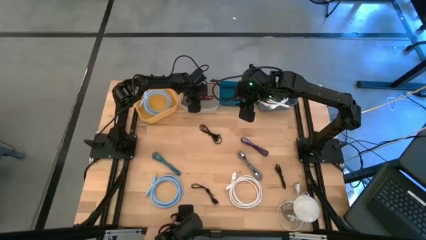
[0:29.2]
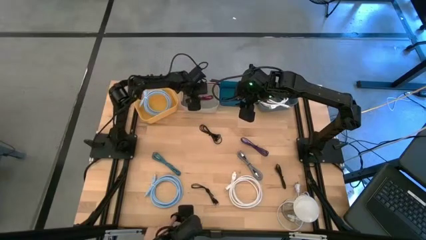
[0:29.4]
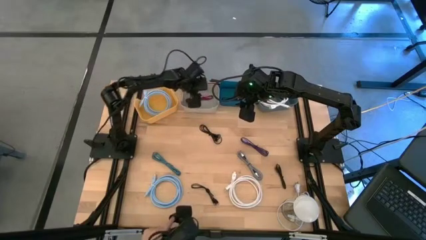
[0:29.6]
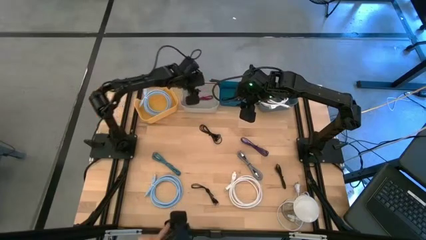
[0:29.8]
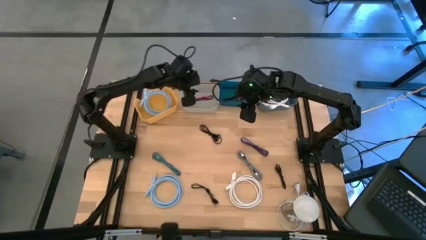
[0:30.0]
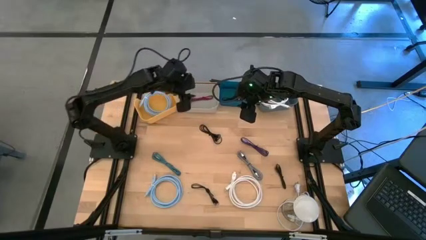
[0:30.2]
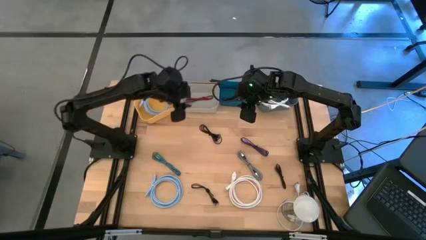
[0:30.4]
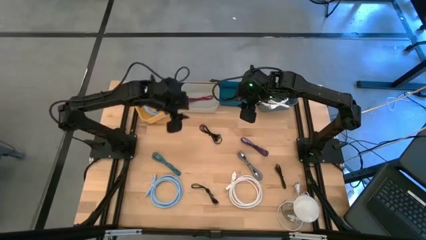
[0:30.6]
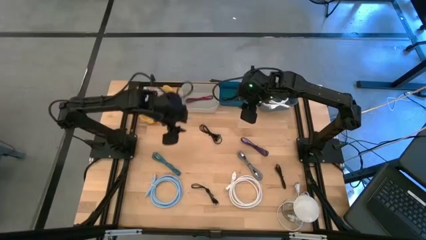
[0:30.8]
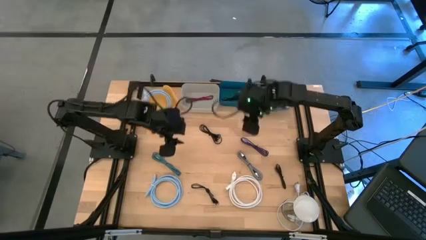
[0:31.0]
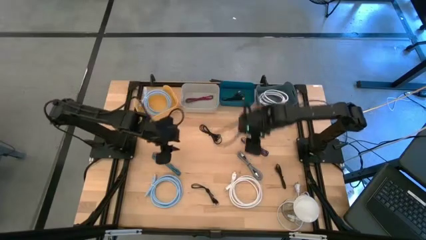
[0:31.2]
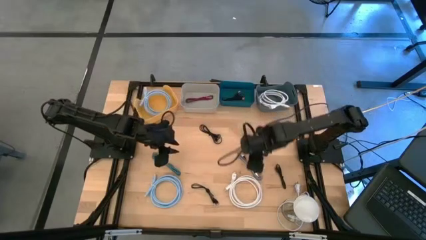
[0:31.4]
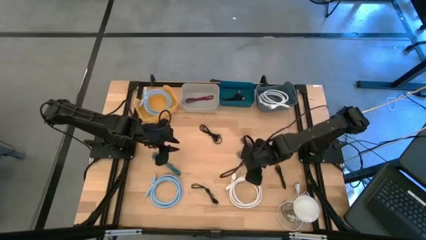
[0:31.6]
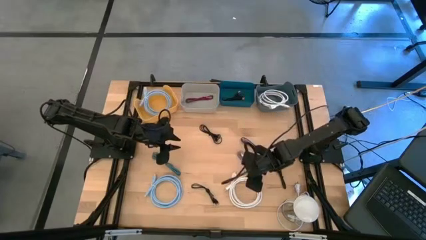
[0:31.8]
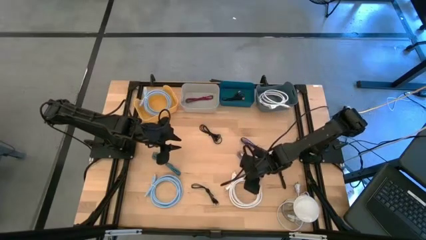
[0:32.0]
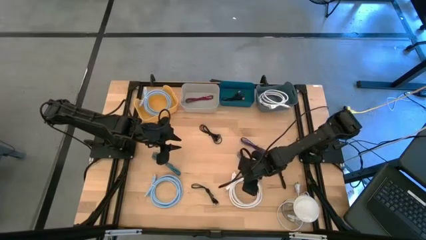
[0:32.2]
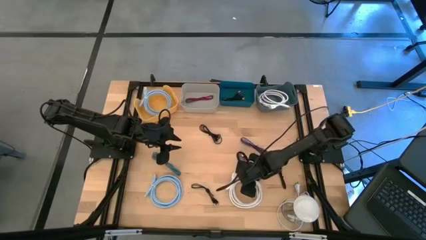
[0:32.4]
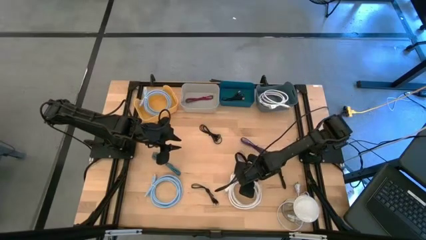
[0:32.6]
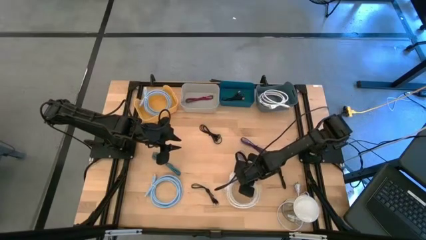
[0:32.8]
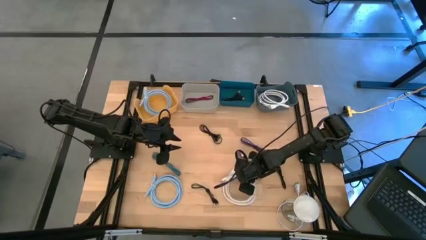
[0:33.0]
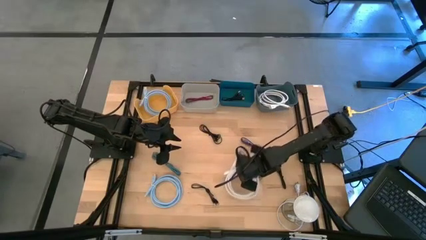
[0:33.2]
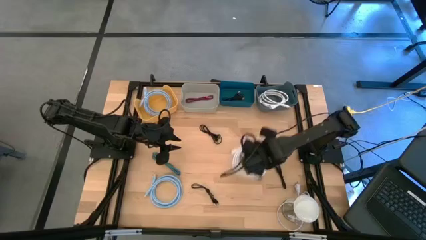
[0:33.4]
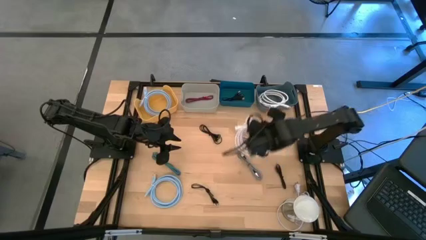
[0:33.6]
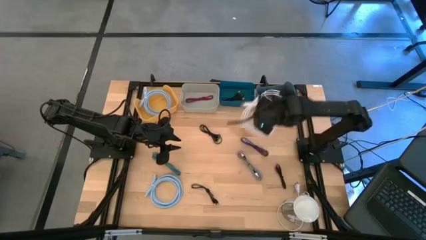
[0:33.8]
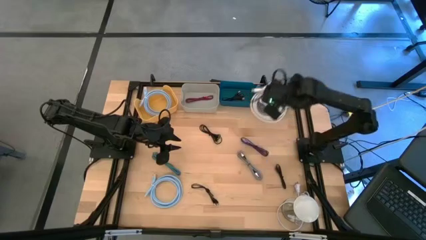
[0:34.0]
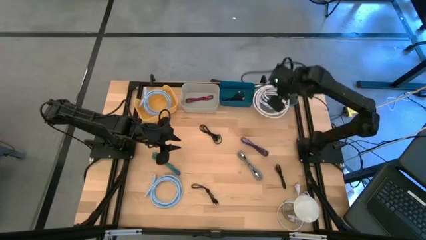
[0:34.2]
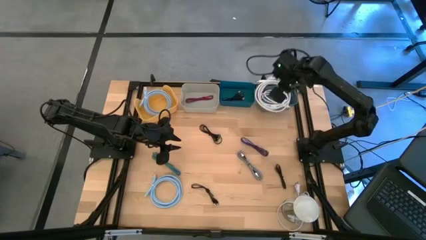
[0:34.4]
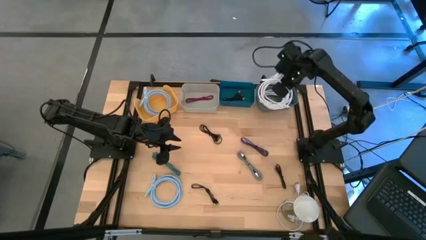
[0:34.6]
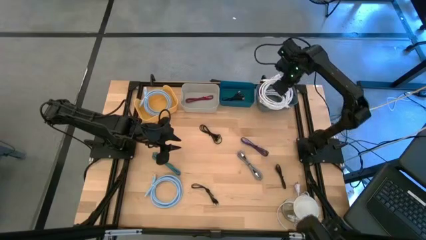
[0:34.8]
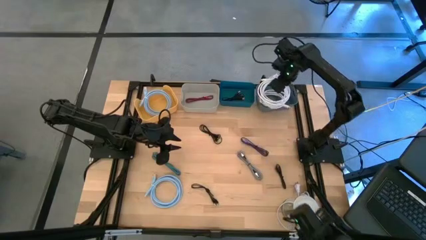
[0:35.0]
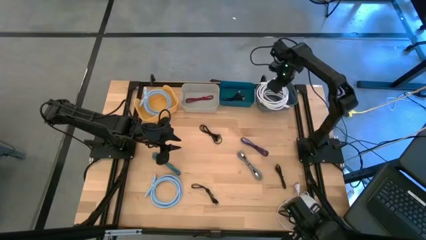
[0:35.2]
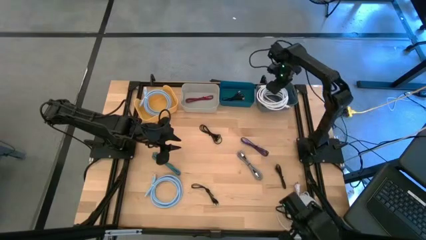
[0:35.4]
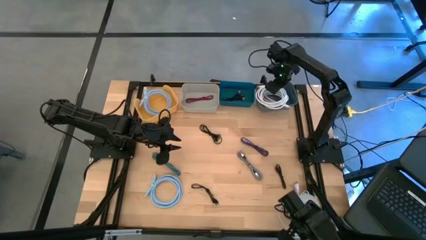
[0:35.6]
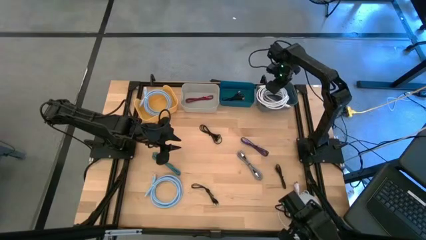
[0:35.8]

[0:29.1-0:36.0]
Task: Pick & Place USB Port
Put the white HDMI cable into the blue bin

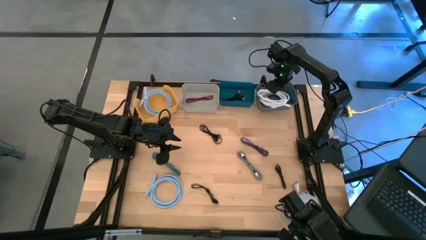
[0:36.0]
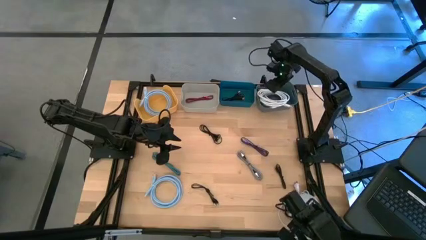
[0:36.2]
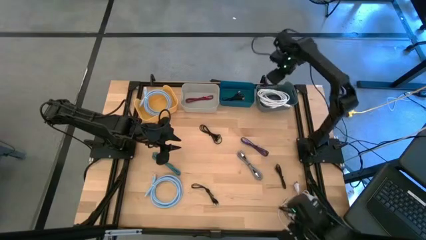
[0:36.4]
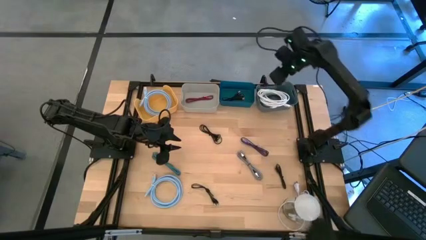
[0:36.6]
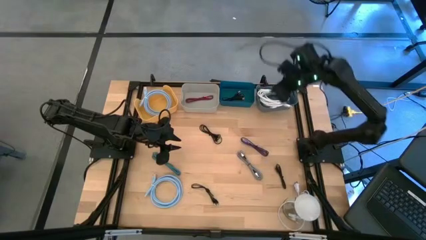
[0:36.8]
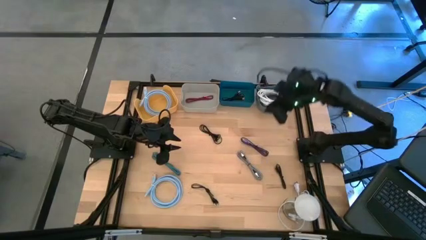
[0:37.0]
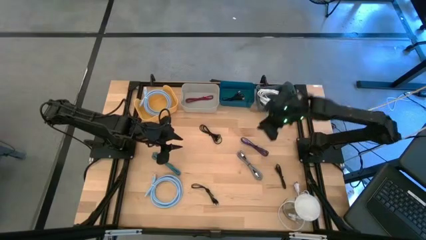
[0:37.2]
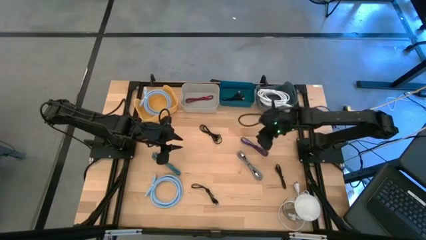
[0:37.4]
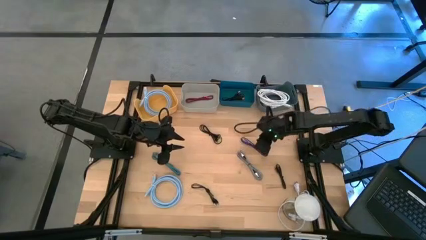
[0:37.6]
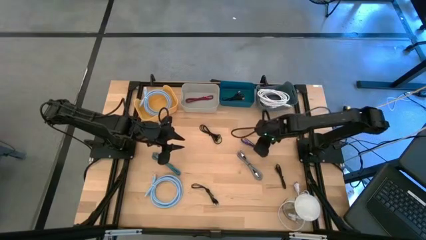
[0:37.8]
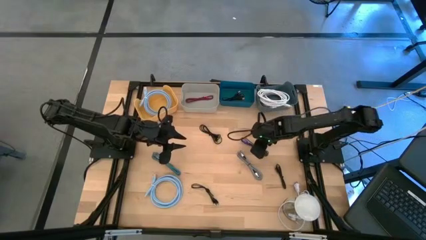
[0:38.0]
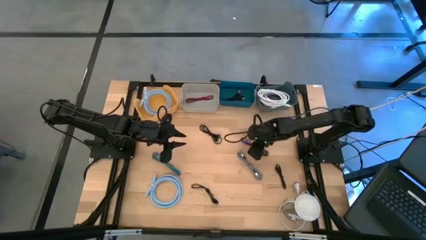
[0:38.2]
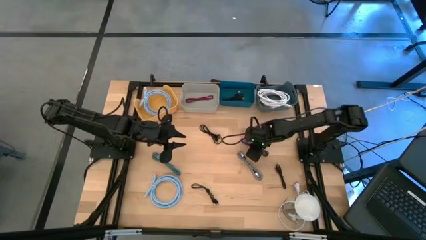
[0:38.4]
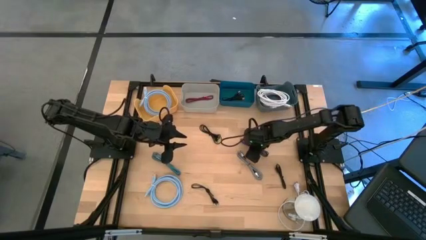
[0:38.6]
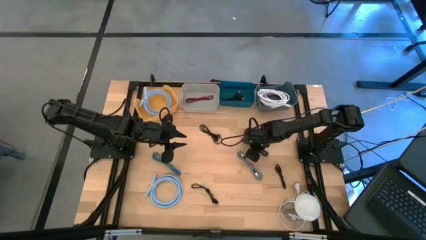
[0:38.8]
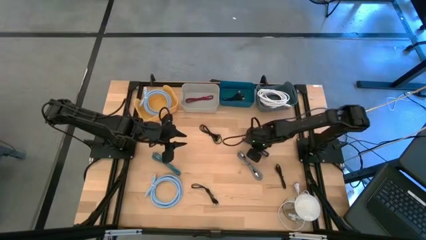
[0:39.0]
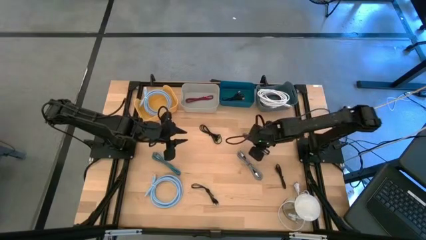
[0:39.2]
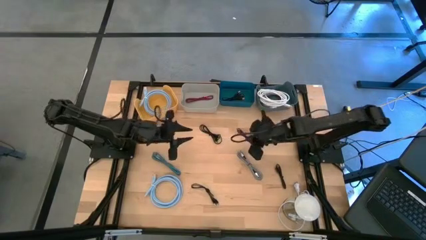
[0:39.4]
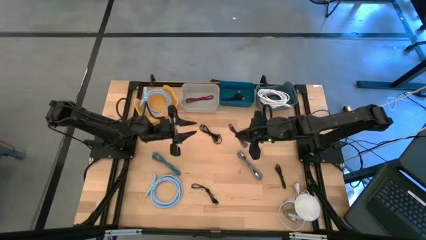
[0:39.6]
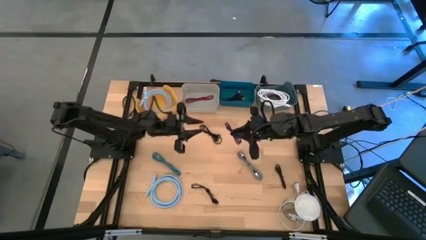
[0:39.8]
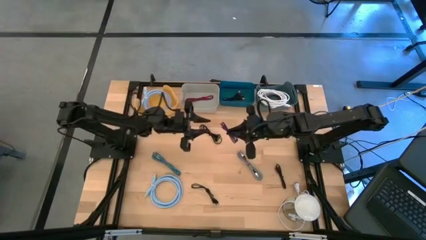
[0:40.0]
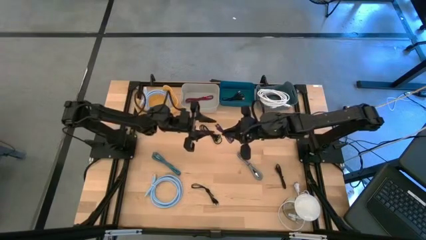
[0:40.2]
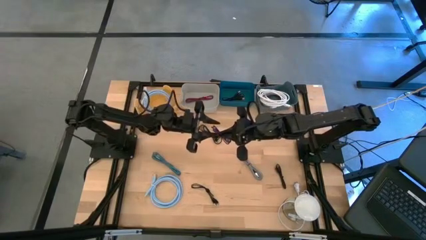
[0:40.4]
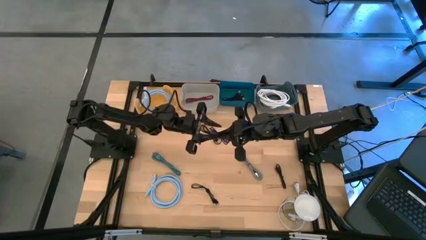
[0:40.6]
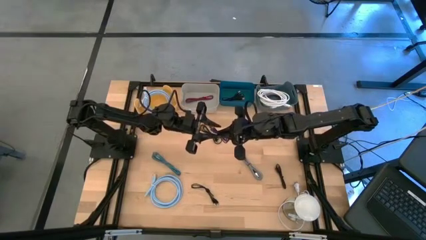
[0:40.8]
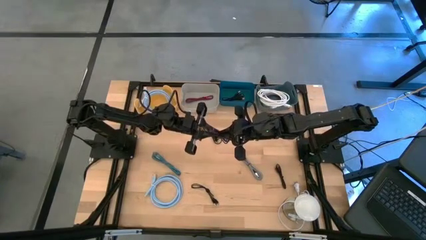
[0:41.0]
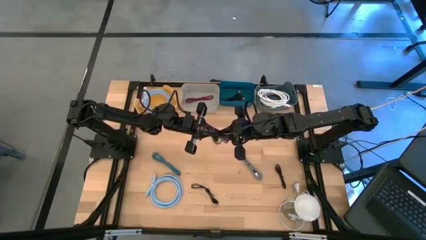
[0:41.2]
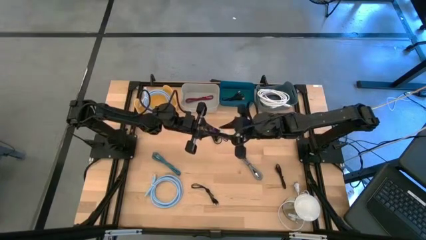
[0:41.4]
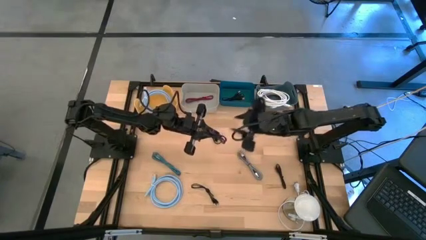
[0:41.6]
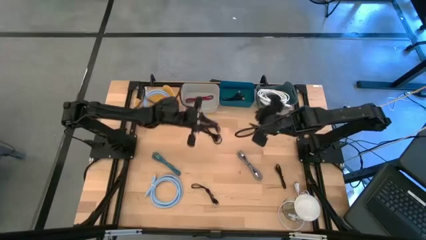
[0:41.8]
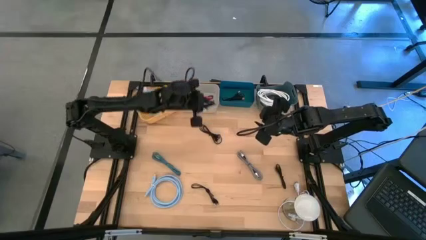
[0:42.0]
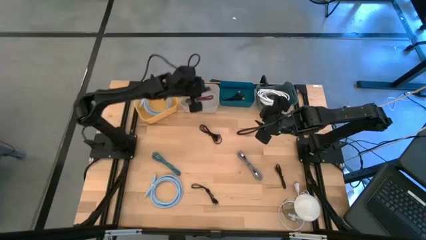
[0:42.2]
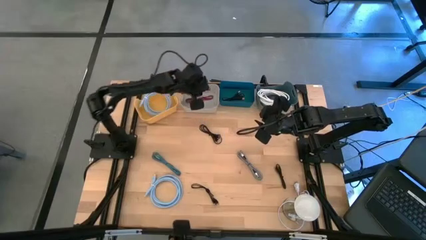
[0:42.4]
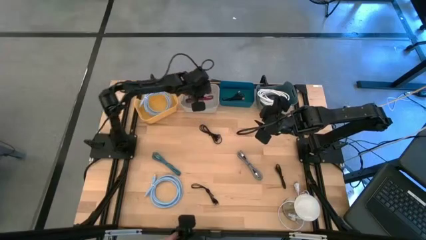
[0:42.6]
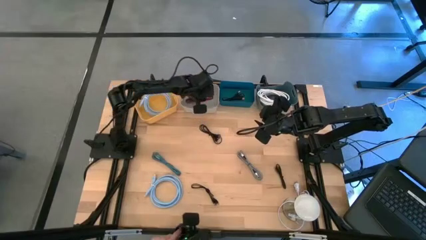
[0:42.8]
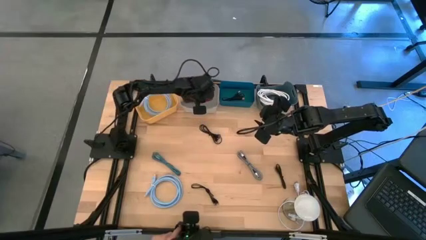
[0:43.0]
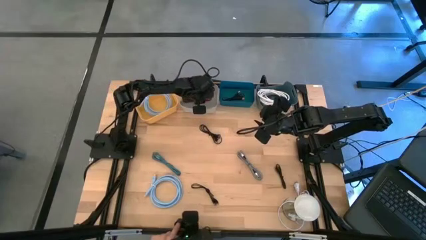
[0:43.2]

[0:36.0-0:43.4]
Put the violet charger cable into the gray bin

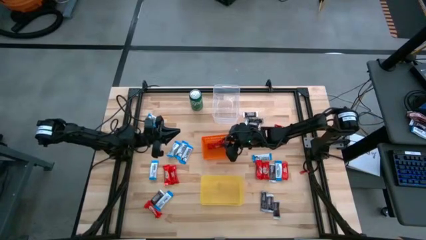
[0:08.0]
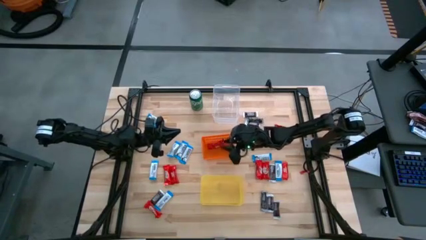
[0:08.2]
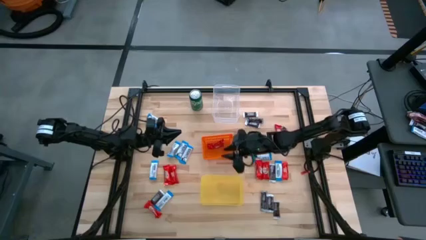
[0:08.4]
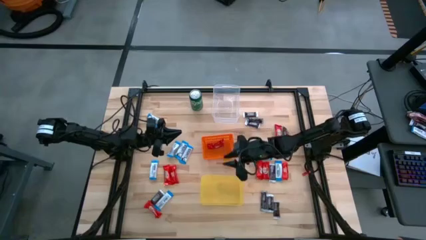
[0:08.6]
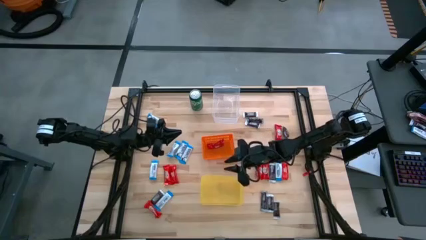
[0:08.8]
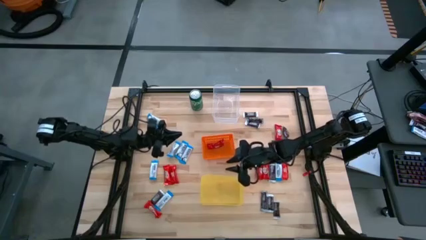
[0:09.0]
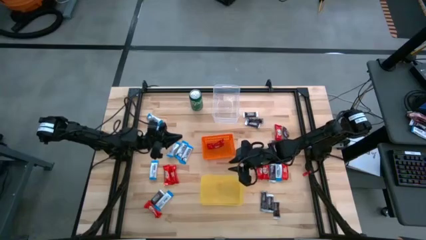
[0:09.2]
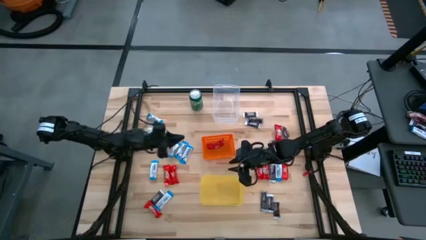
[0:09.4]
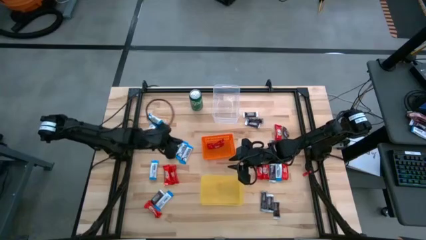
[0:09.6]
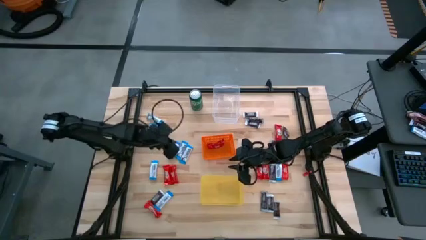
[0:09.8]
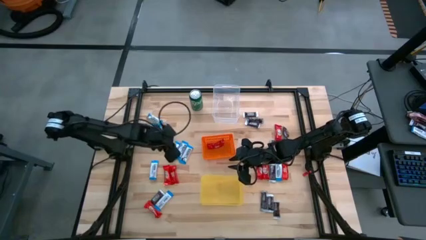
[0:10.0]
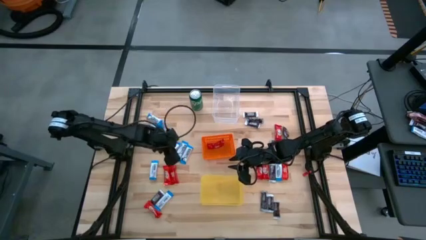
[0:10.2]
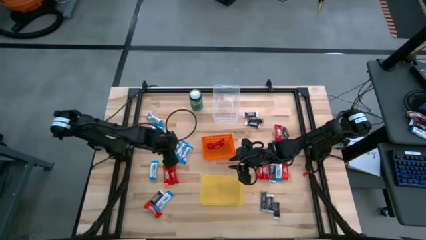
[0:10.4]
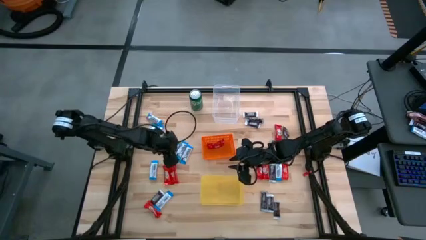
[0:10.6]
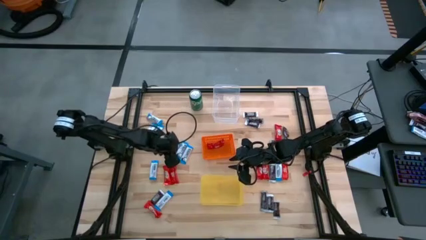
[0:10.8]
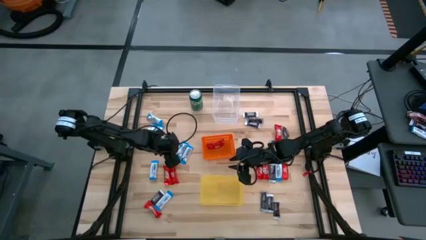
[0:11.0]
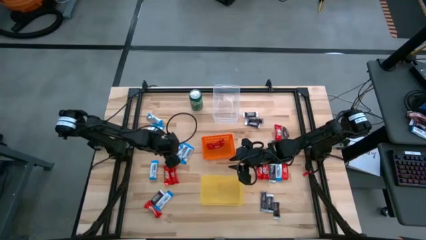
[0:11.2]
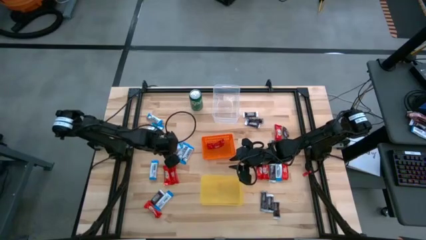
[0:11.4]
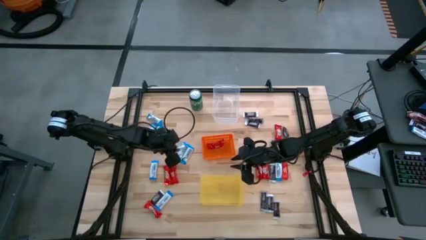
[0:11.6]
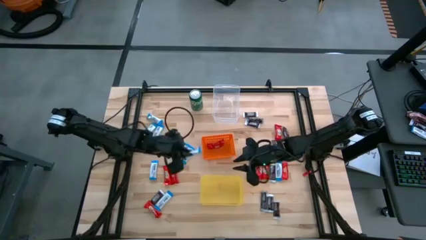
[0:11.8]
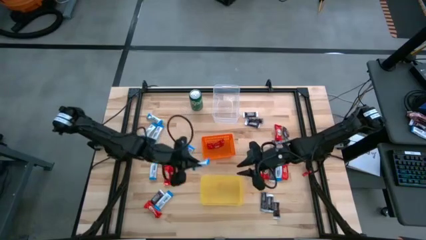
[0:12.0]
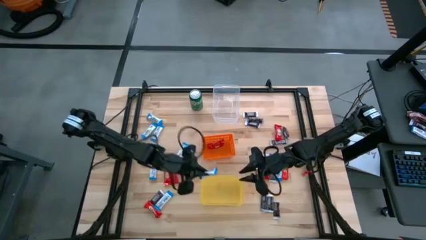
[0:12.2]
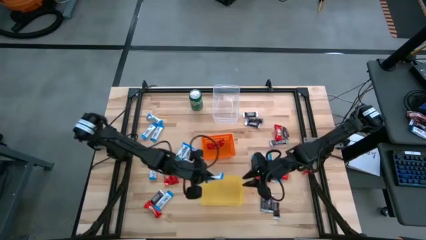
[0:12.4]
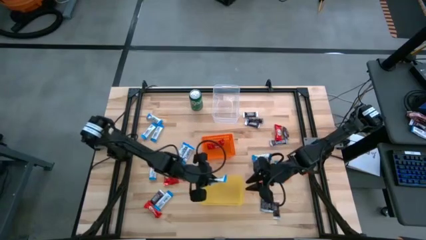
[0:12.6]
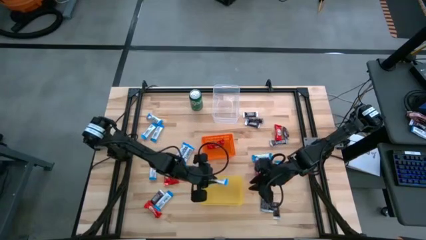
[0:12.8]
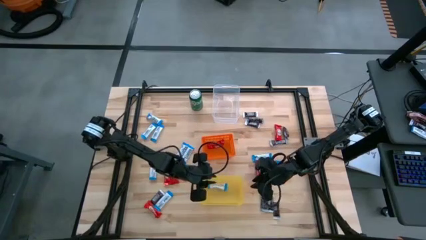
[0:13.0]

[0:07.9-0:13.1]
Task: Sort candy
Put the white candy into the yellow bin
